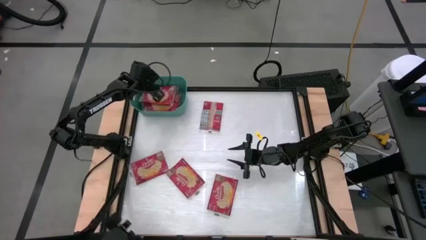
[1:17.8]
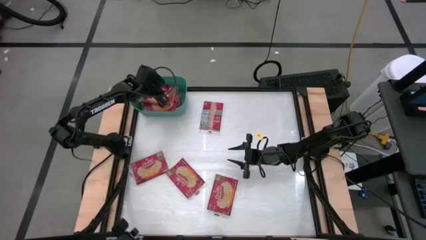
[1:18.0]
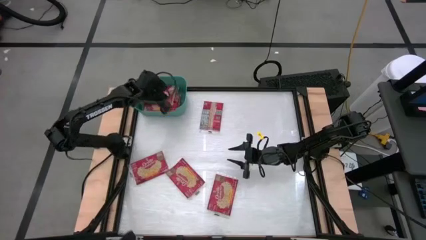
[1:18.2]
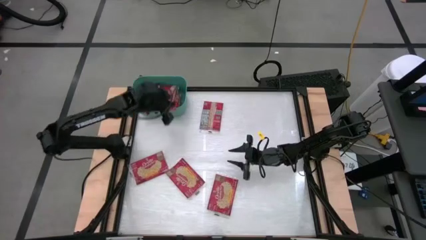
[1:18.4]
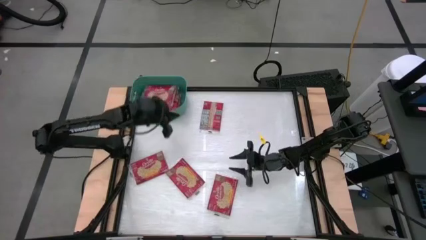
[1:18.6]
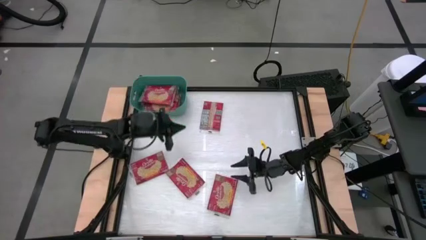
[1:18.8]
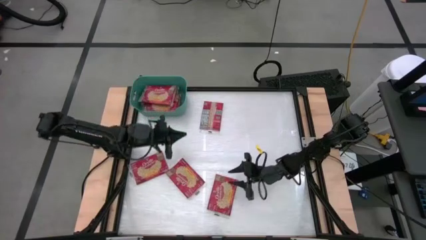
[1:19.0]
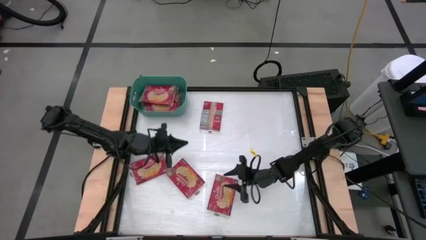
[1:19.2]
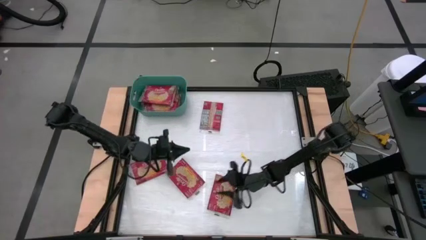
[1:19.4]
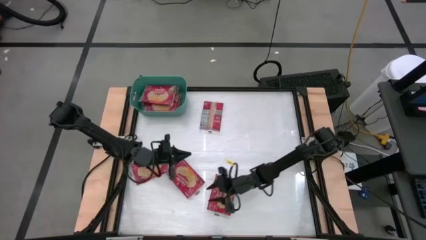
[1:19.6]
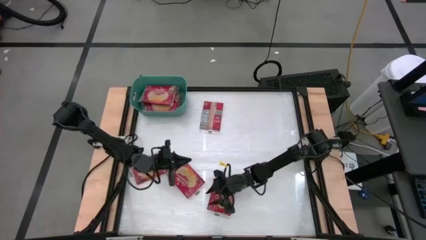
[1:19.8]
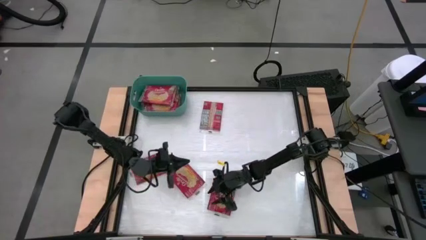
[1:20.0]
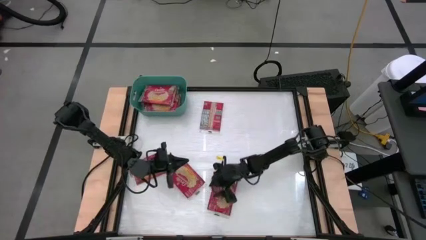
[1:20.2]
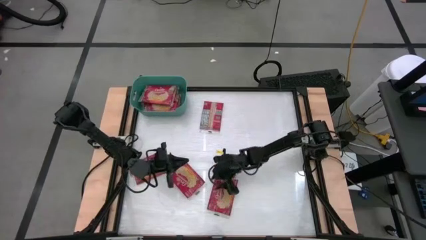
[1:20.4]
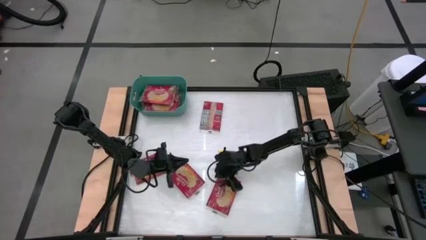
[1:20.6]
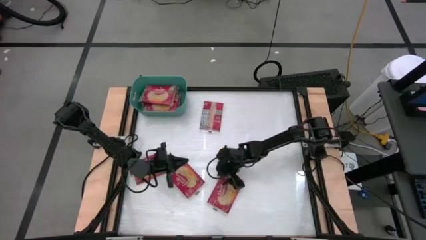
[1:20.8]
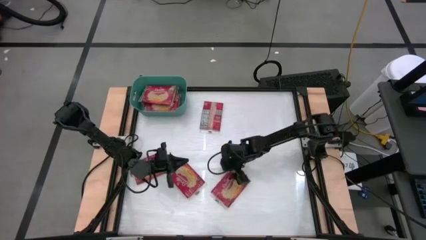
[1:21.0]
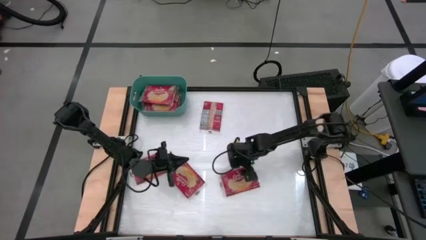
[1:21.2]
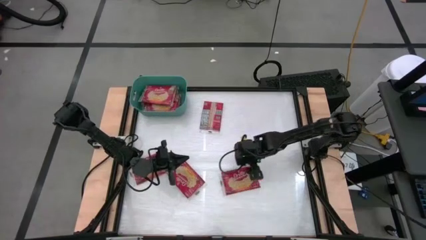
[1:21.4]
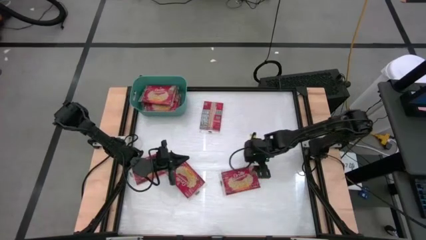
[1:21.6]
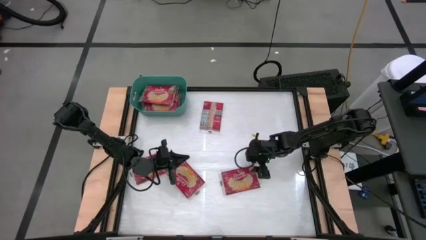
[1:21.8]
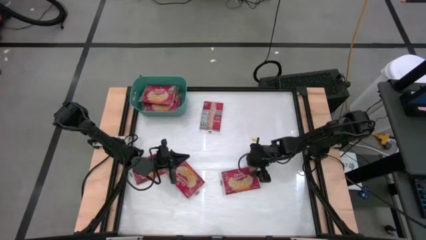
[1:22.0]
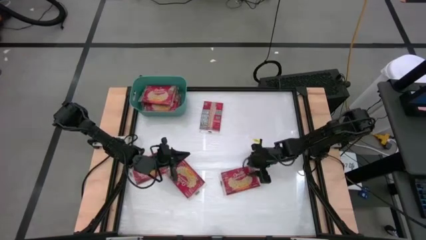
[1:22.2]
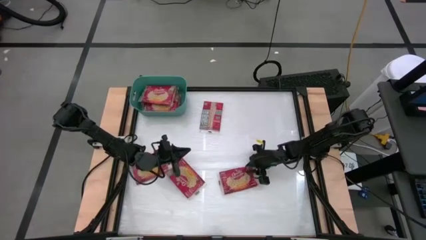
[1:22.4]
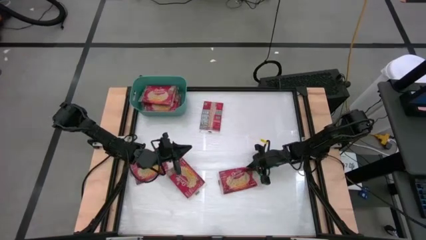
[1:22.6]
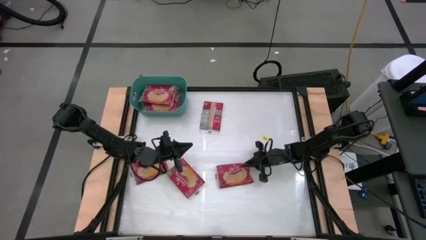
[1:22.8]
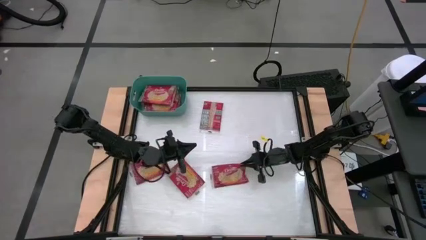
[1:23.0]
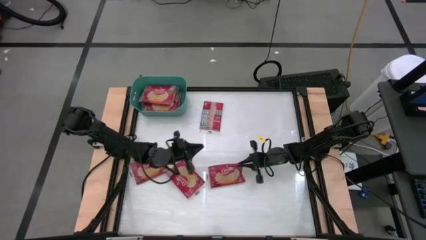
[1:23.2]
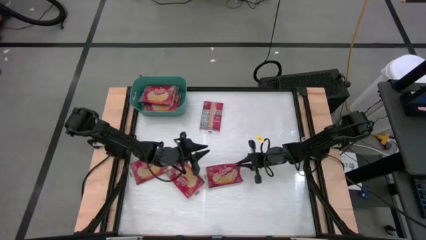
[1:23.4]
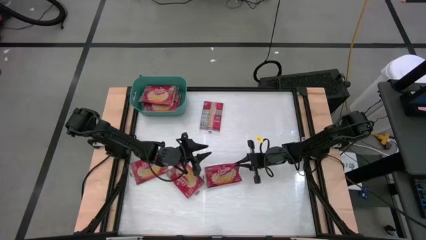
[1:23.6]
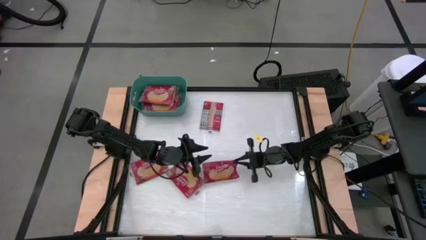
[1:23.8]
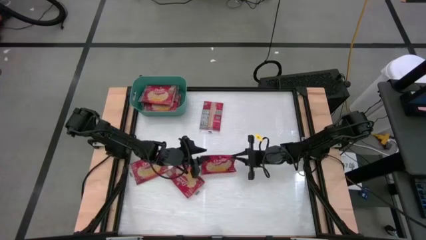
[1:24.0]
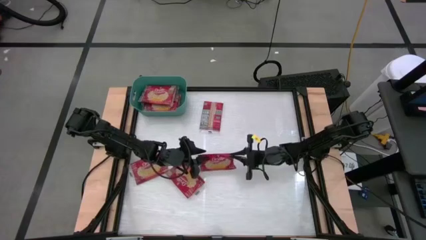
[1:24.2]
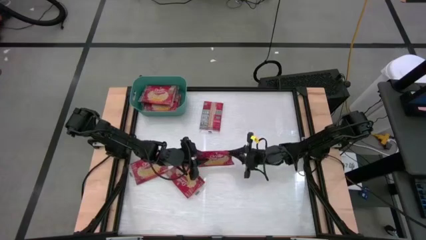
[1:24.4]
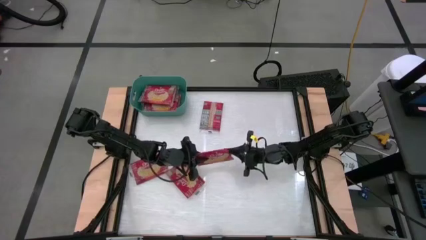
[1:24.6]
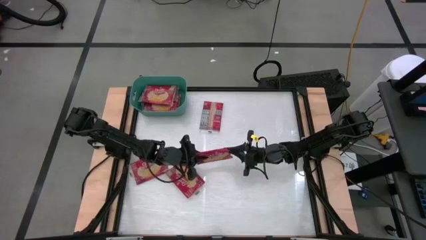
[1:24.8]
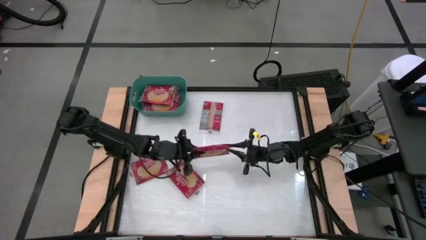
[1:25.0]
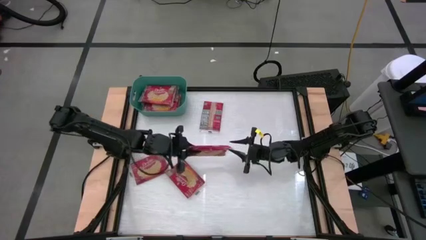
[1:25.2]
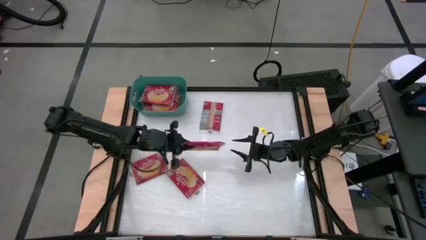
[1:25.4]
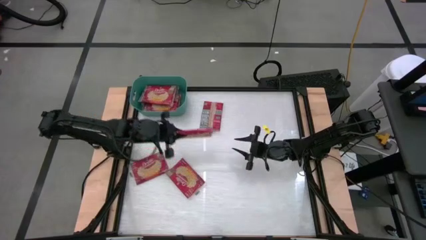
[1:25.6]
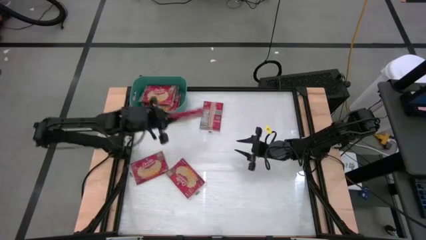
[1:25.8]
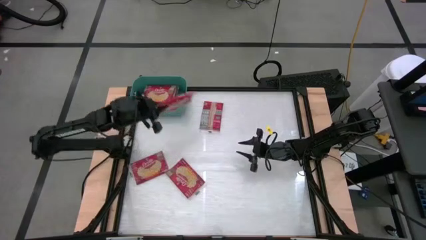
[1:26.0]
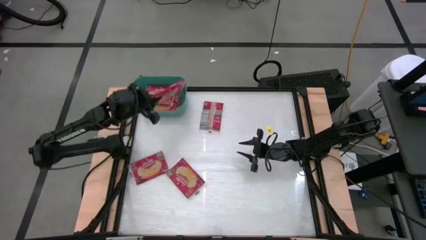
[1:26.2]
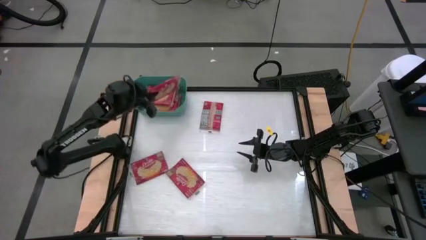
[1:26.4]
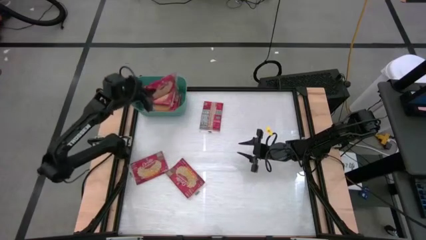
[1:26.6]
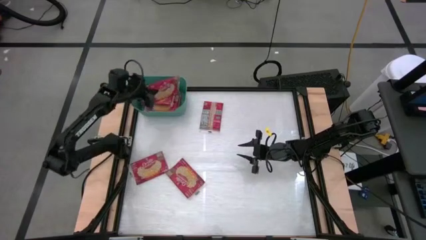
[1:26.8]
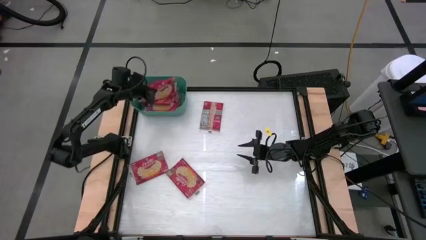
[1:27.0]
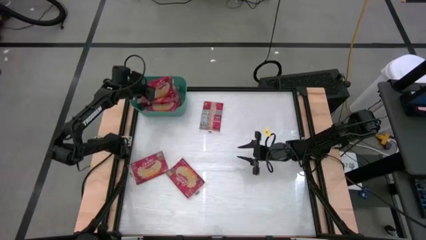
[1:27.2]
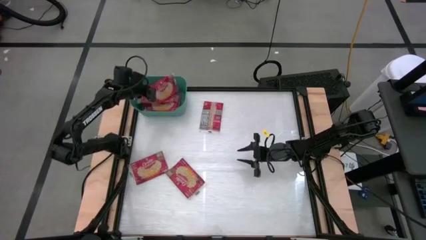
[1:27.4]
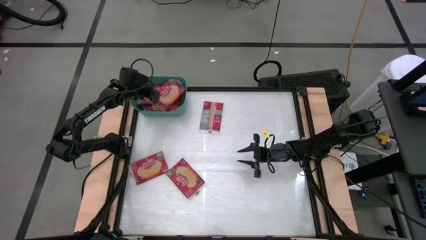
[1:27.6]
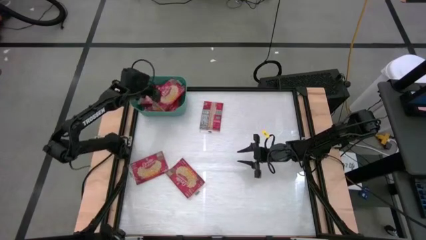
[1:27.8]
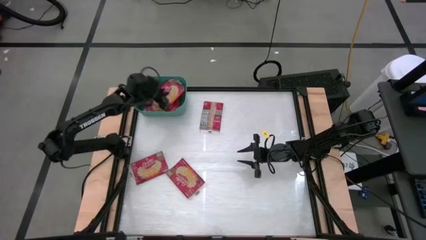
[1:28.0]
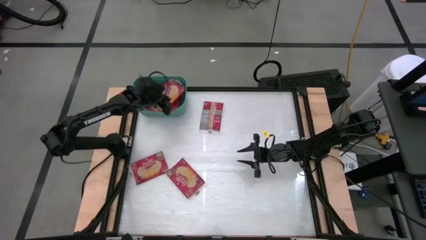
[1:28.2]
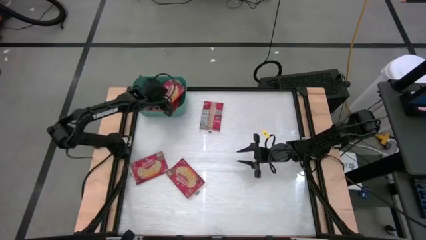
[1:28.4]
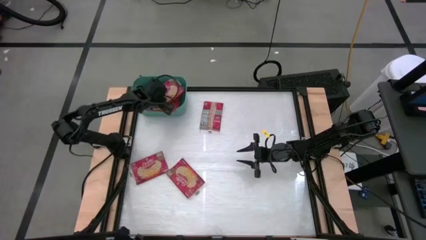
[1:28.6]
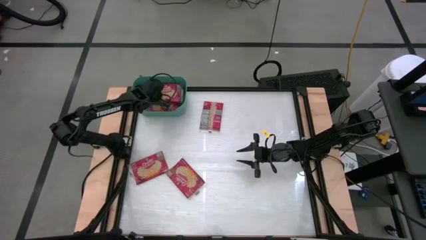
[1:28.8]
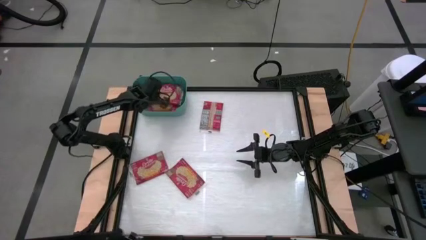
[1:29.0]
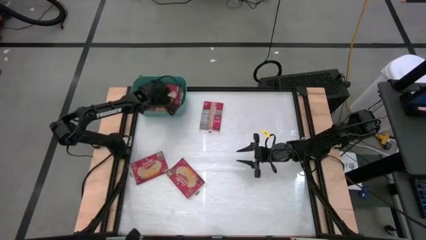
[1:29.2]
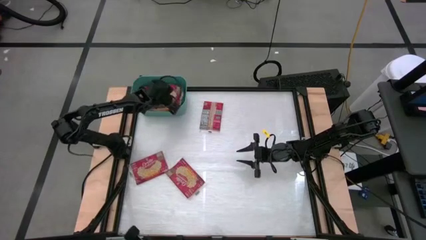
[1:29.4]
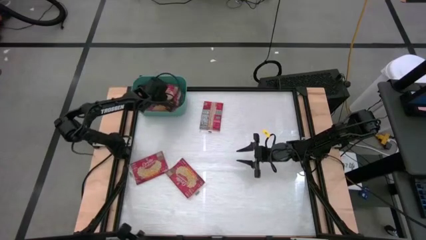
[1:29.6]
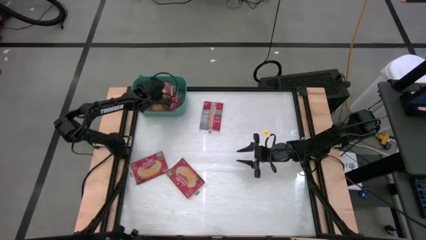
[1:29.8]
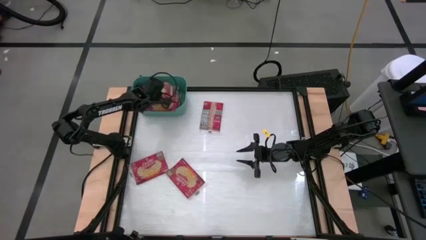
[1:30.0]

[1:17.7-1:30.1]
Task: Sort popcorn bags into baskets
Stack the red popcorn bag on the red popcorn bags in the green bin
